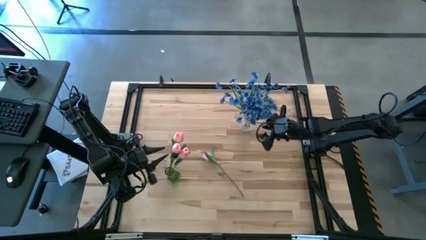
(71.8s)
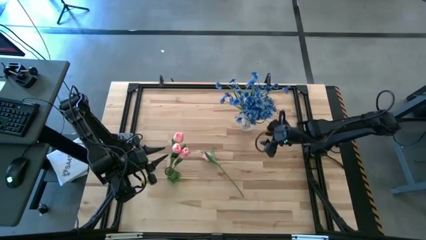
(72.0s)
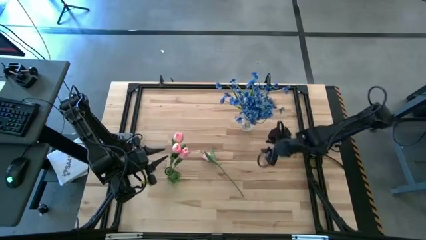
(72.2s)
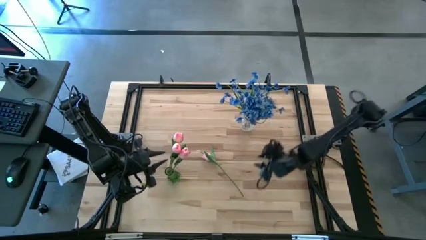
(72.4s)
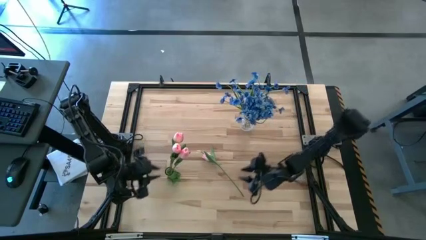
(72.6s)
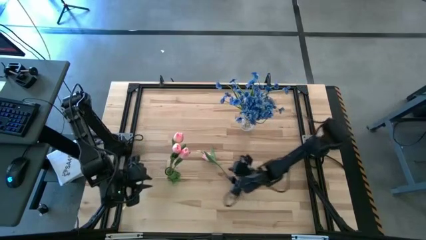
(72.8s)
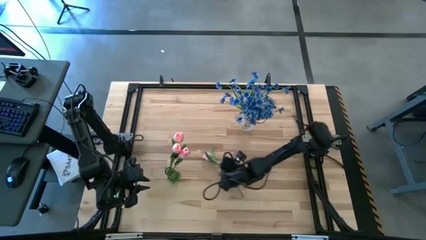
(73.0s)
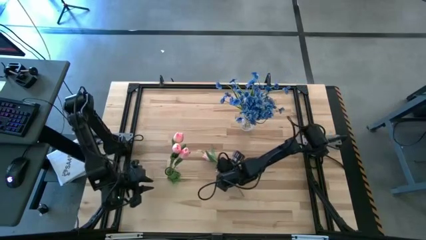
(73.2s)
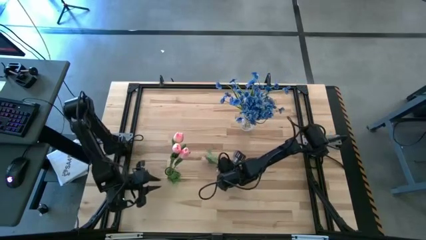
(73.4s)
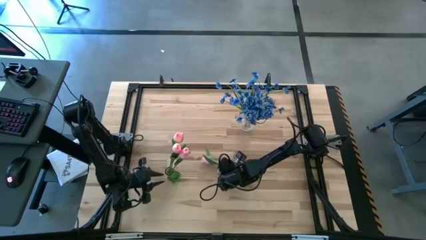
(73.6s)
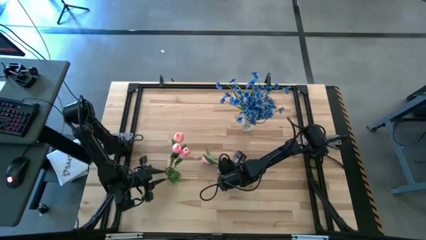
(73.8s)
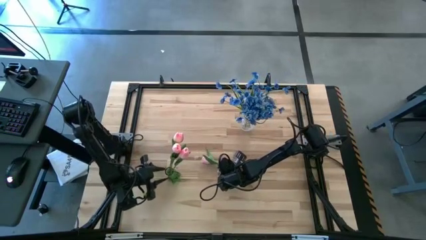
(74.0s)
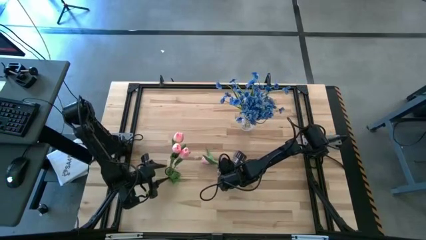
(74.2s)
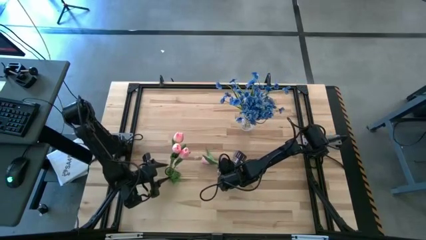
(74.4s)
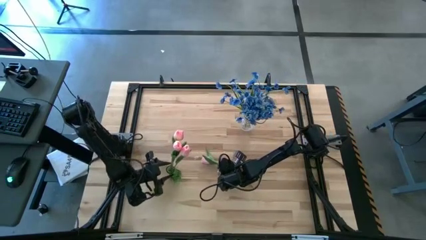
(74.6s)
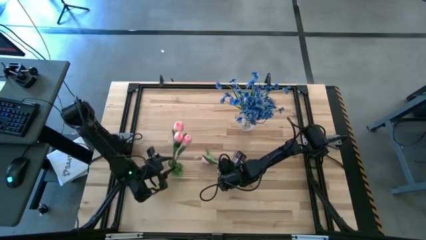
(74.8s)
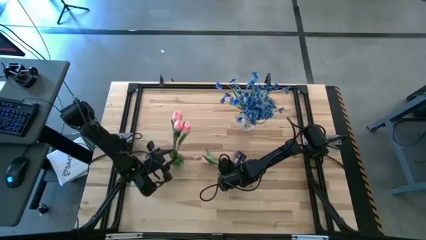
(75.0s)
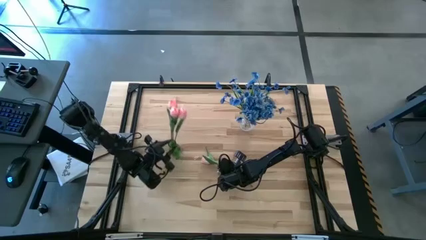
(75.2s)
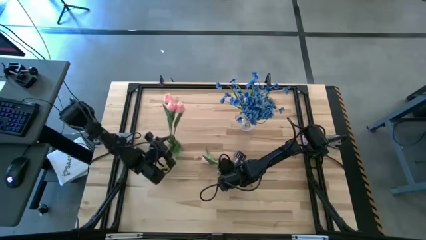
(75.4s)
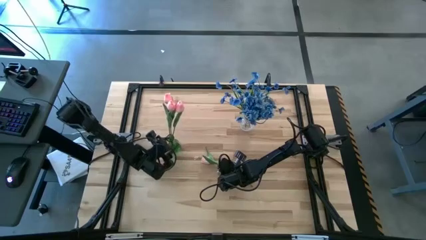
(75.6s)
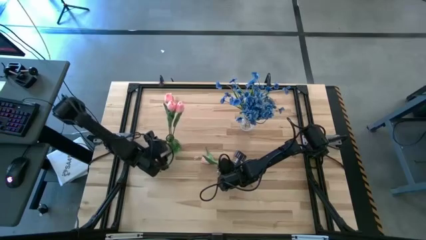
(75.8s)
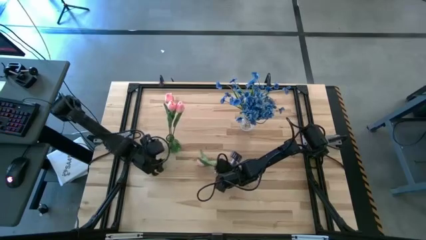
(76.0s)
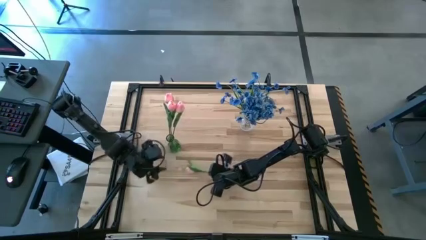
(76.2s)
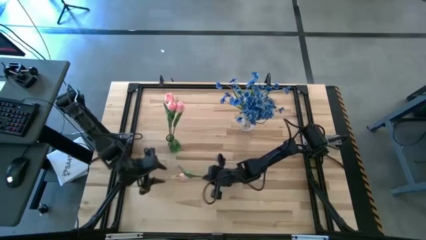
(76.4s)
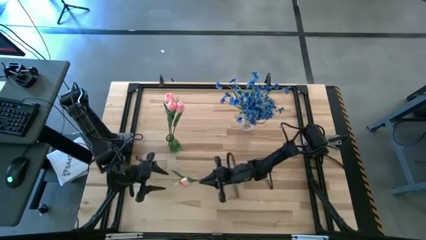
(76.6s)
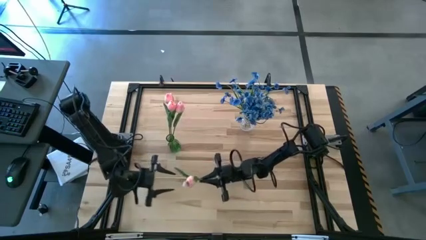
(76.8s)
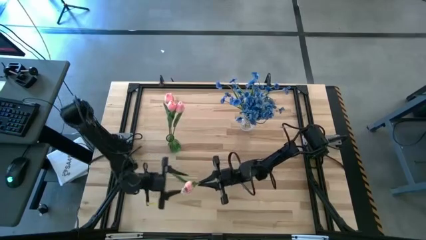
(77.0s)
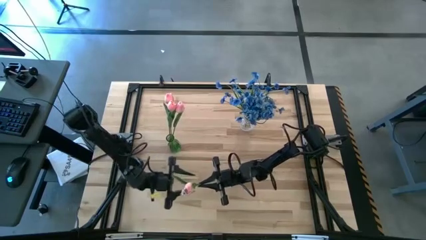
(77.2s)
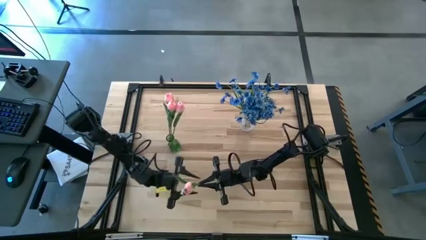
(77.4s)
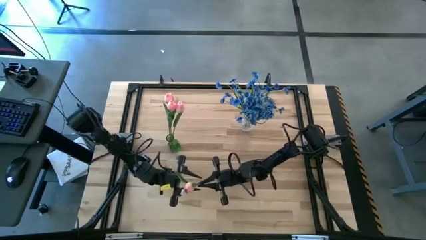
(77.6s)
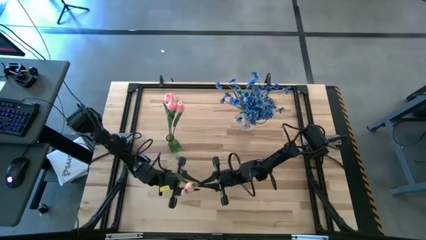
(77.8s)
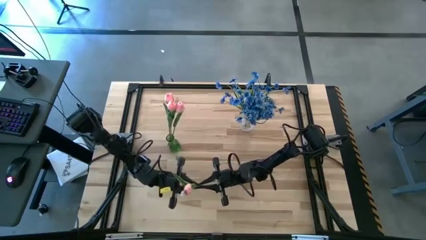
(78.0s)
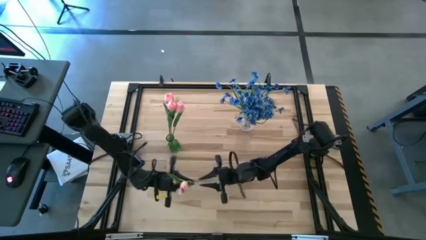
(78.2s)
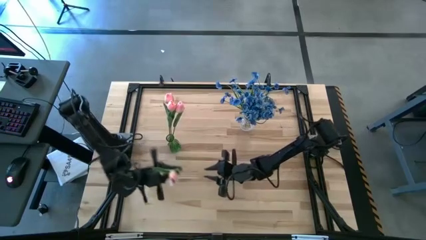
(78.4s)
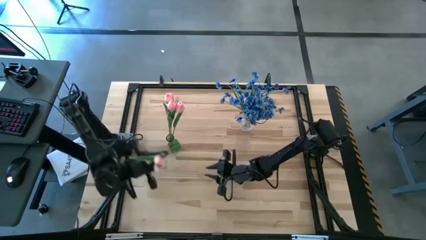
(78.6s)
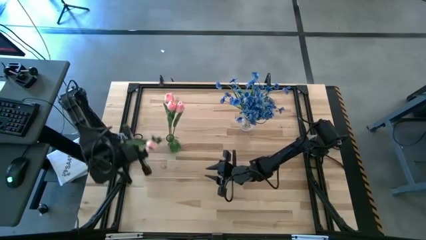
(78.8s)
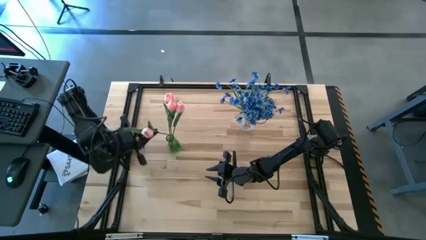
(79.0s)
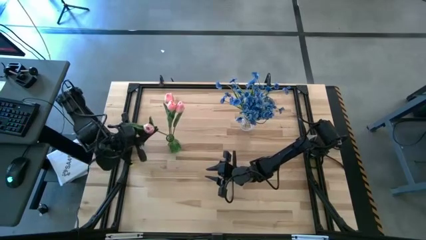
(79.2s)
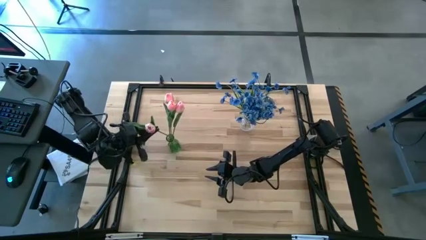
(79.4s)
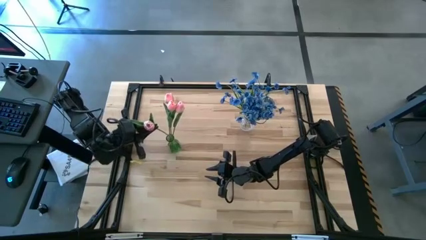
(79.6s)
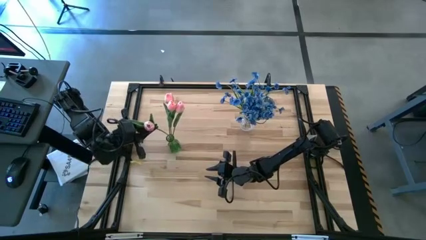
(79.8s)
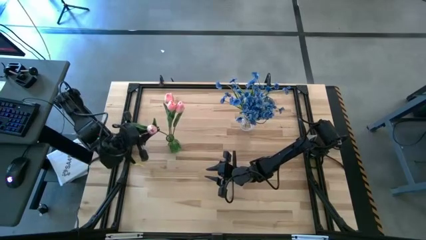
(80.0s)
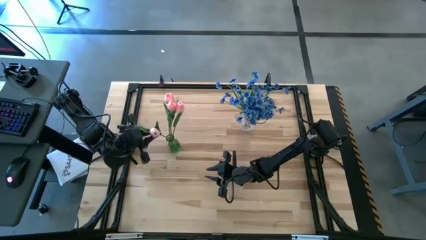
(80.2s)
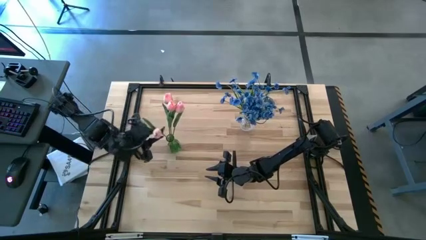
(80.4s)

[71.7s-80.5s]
Task: Sort flowers into vase by color
Put the pink flower into the green vase

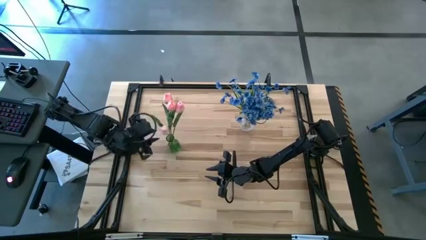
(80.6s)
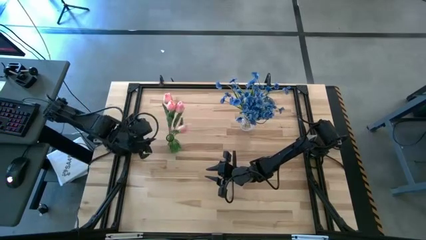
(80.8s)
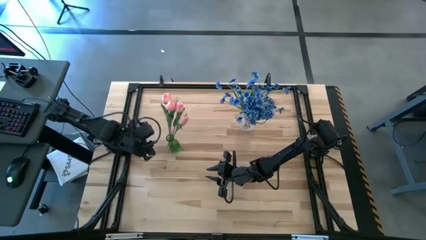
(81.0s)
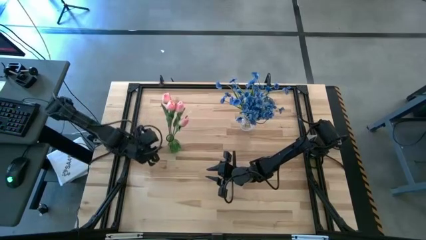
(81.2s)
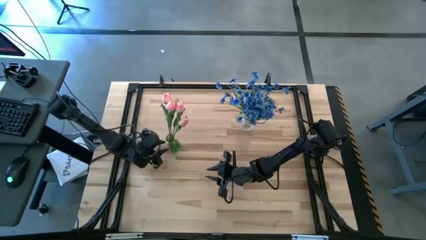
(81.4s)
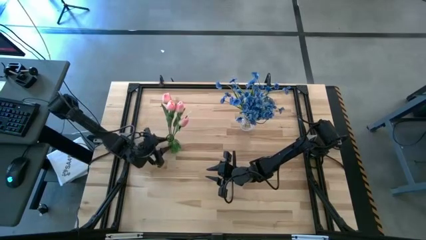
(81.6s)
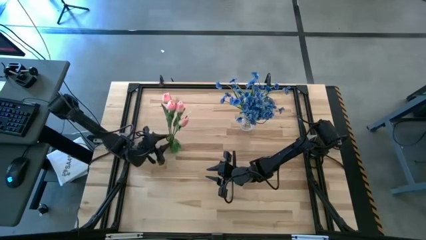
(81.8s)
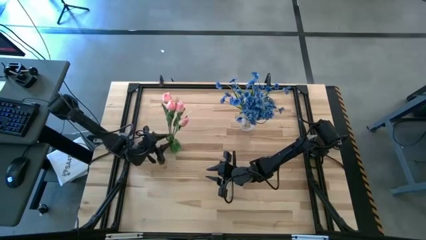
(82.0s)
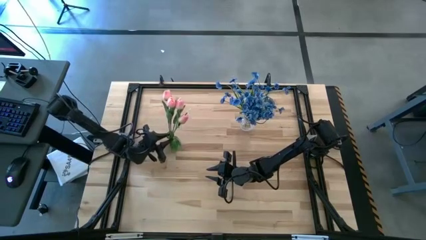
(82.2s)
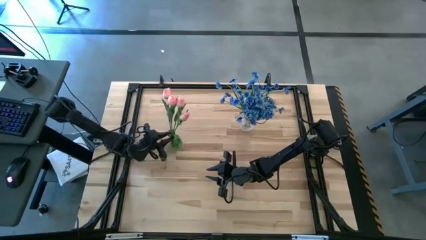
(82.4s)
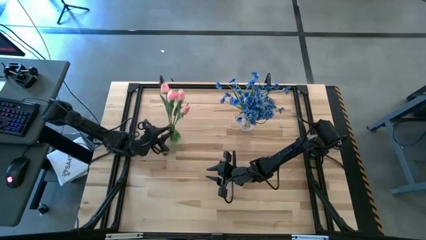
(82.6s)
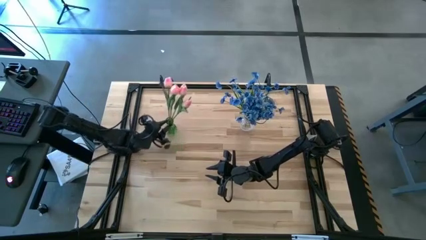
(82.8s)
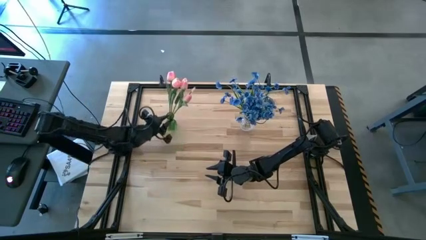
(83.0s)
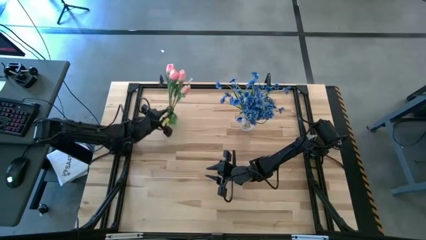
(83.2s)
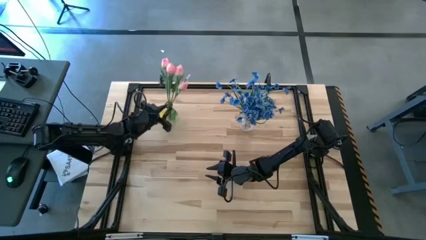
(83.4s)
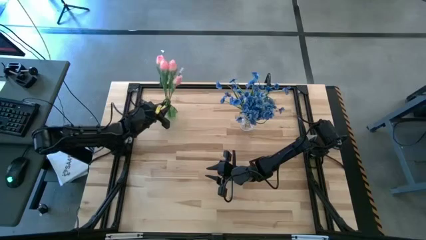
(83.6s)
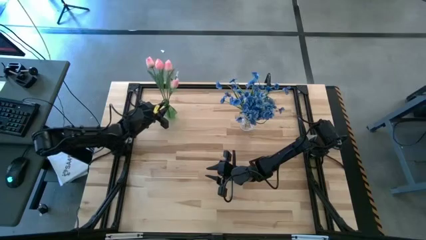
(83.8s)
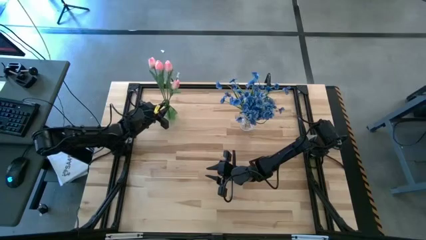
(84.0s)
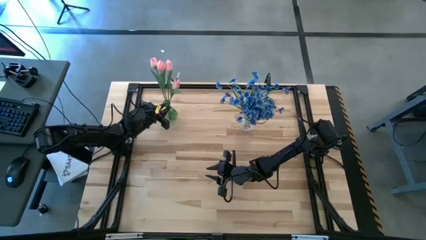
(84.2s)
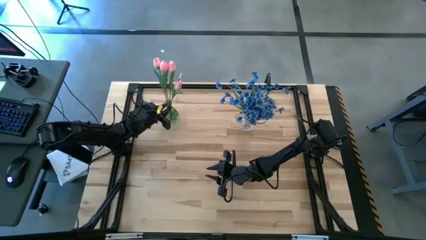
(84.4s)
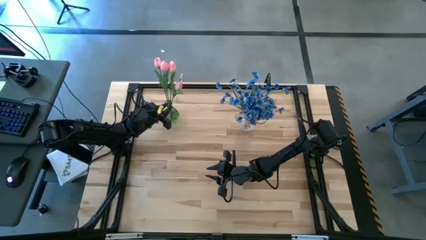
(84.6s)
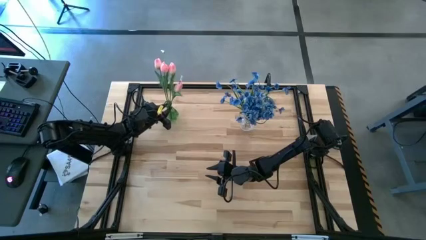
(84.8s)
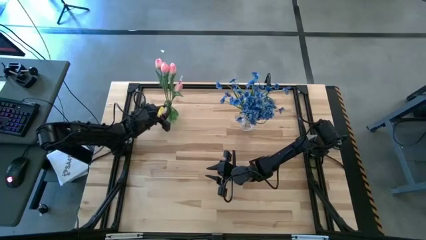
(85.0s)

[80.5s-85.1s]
Move the green vase to the top left of the table

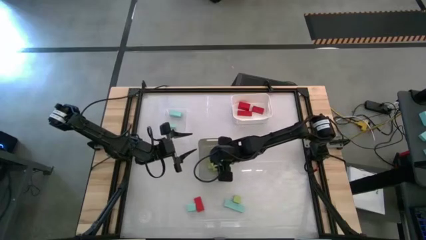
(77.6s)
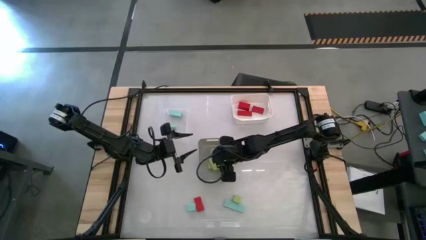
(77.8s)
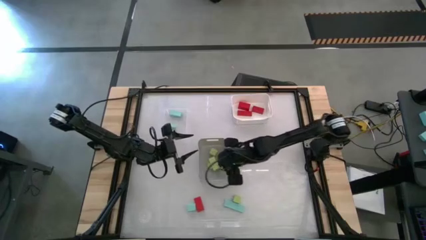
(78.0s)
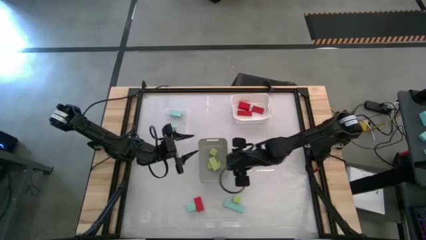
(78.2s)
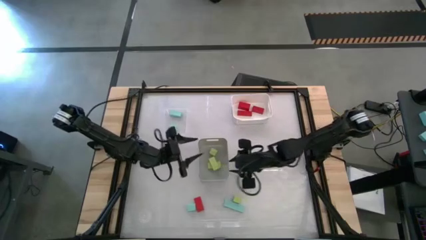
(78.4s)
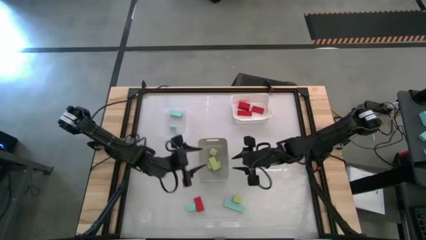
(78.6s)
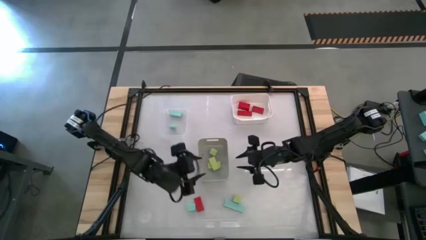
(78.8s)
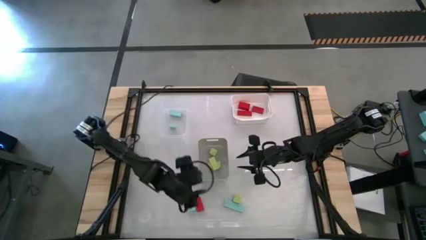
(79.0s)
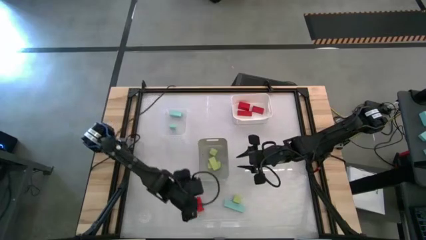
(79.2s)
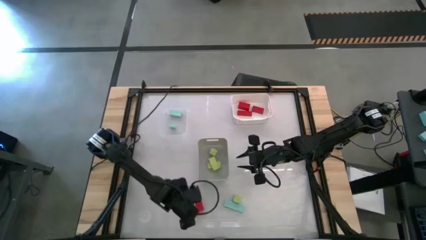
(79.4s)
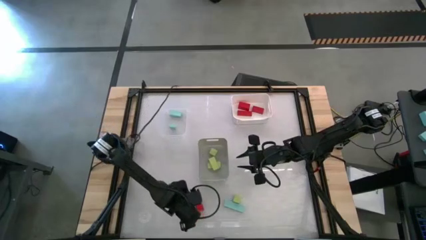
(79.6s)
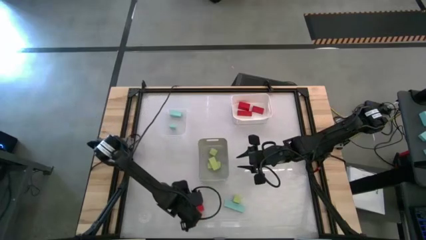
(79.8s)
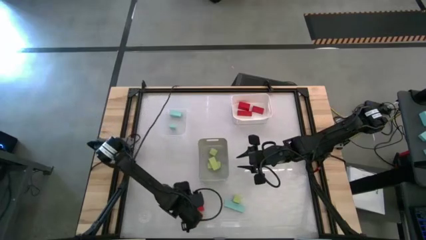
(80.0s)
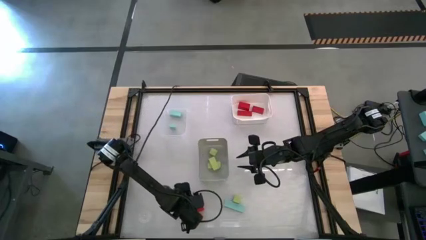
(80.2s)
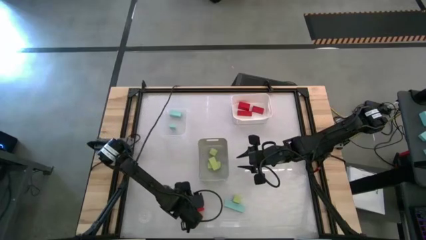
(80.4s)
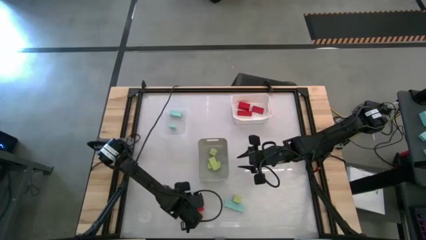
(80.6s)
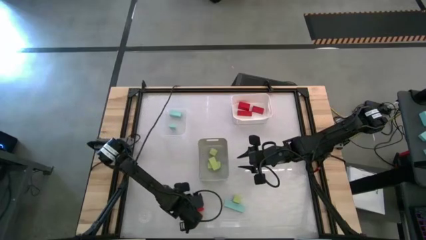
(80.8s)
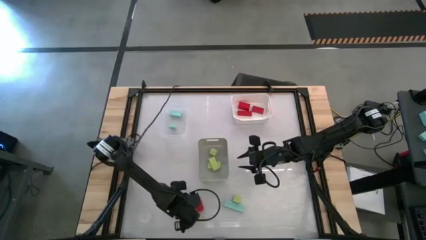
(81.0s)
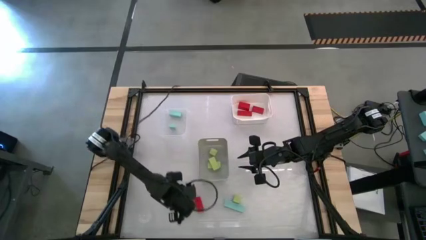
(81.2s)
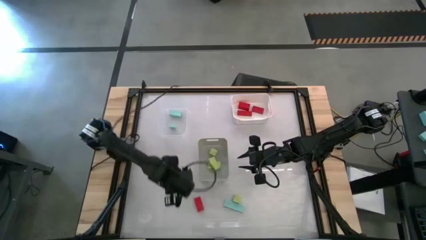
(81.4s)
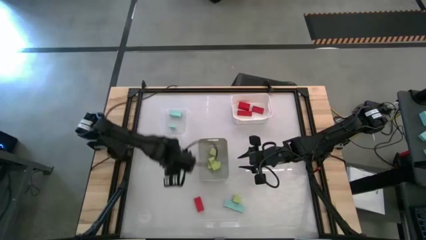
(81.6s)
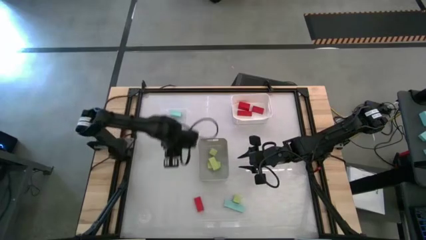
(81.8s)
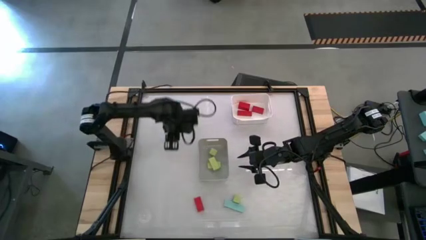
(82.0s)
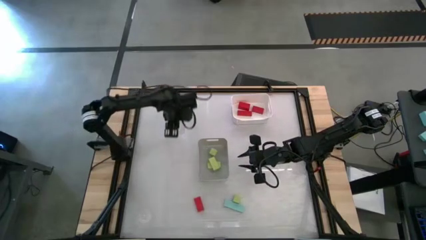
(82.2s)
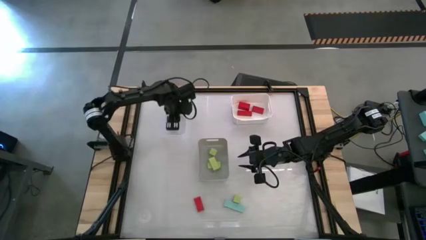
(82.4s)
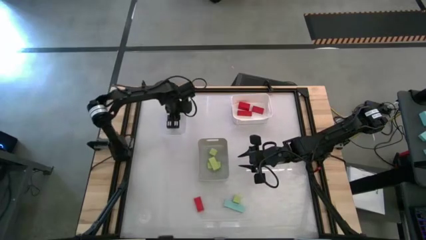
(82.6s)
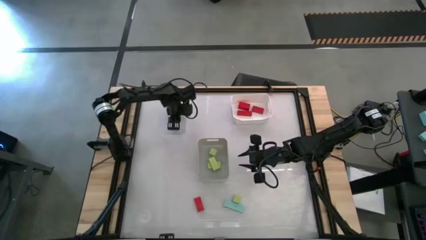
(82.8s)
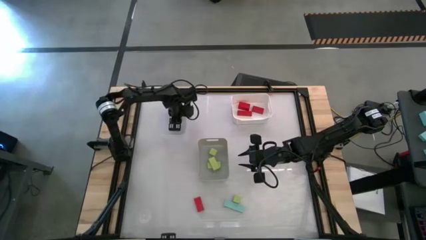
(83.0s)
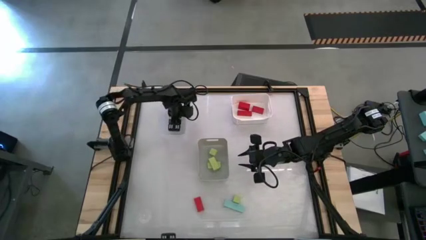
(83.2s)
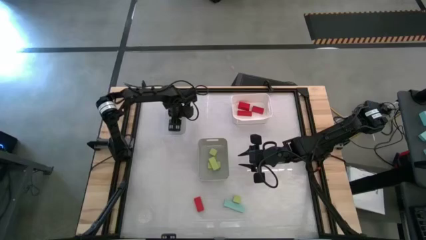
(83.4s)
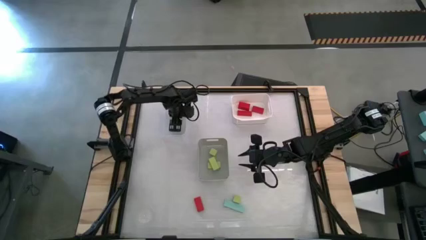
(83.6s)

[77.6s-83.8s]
Task: Sort & place blocks by color
Put the blue block into the transparent bin
